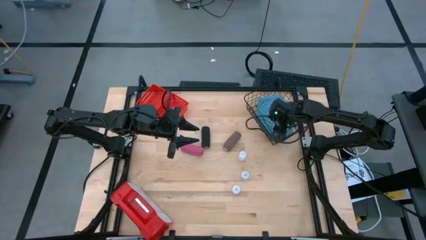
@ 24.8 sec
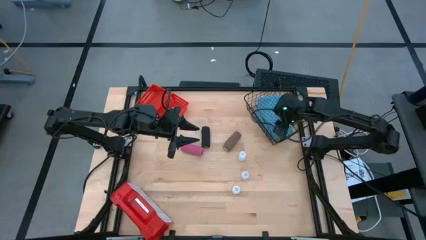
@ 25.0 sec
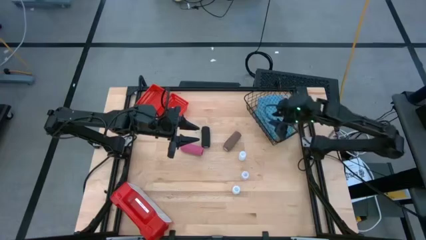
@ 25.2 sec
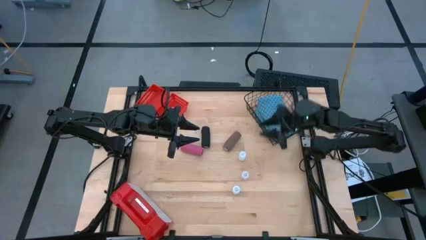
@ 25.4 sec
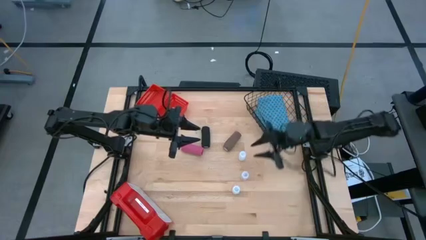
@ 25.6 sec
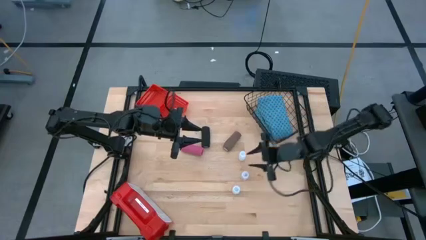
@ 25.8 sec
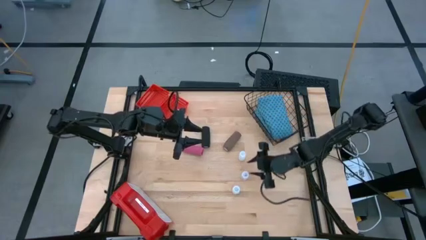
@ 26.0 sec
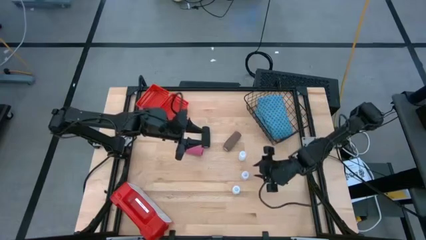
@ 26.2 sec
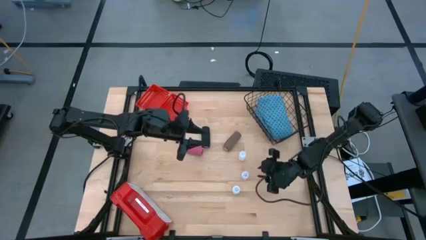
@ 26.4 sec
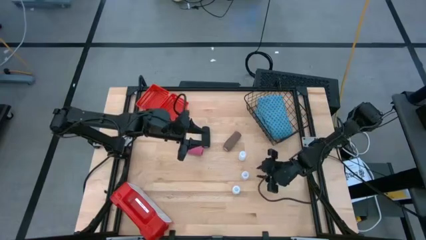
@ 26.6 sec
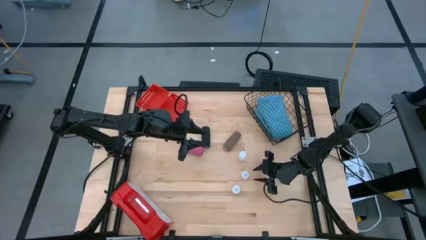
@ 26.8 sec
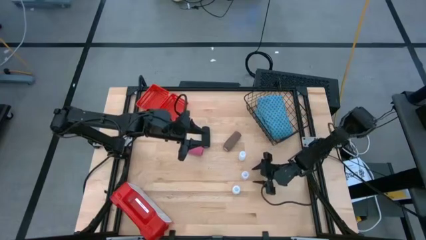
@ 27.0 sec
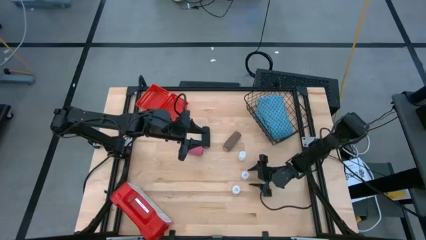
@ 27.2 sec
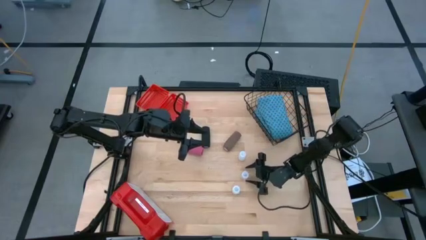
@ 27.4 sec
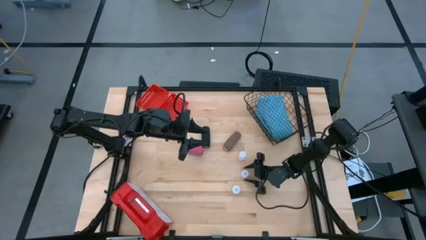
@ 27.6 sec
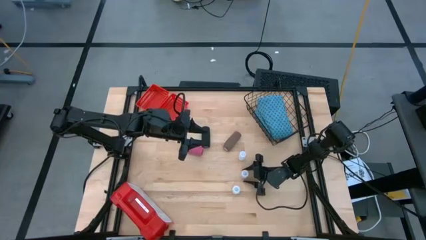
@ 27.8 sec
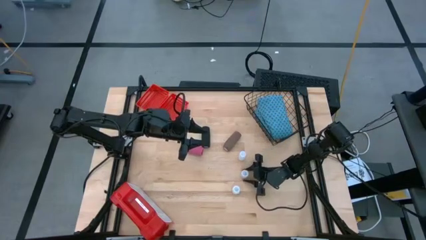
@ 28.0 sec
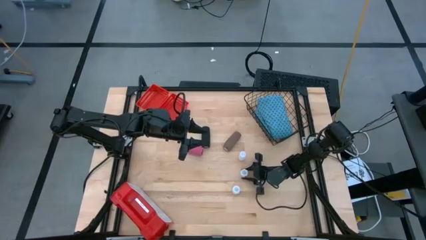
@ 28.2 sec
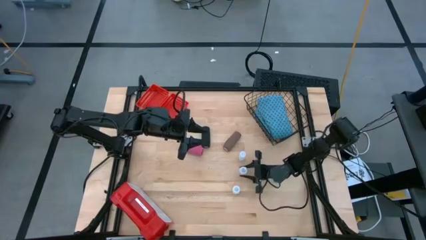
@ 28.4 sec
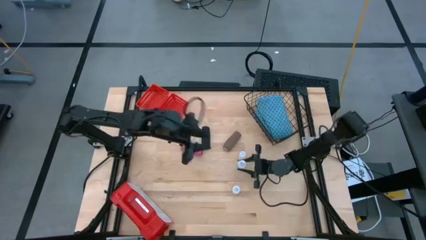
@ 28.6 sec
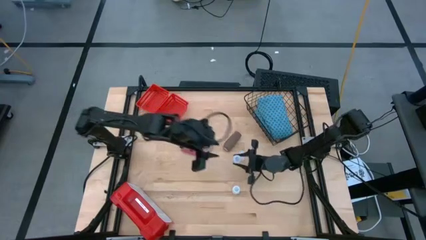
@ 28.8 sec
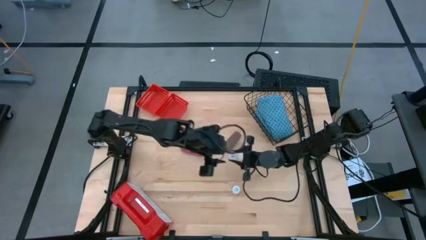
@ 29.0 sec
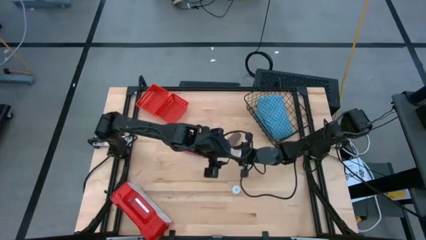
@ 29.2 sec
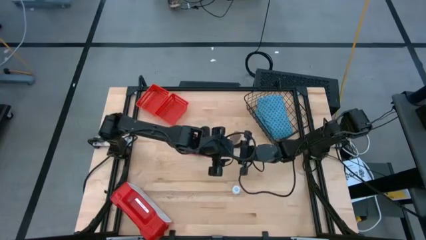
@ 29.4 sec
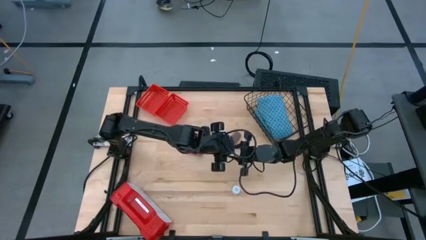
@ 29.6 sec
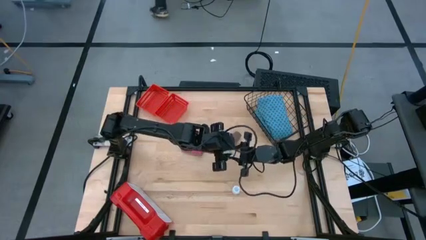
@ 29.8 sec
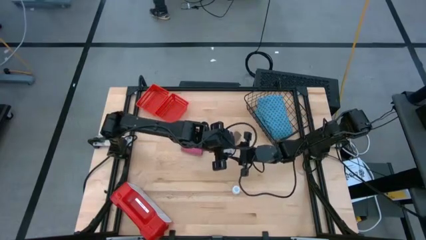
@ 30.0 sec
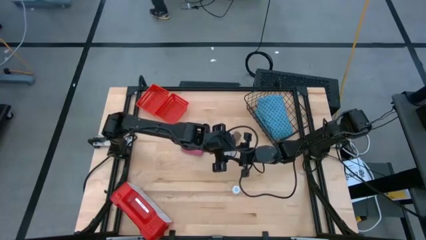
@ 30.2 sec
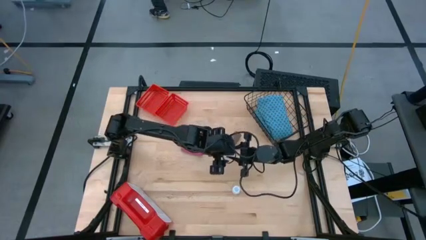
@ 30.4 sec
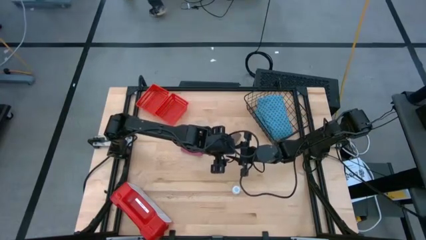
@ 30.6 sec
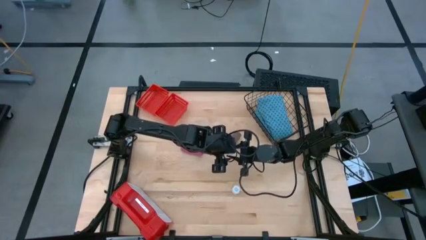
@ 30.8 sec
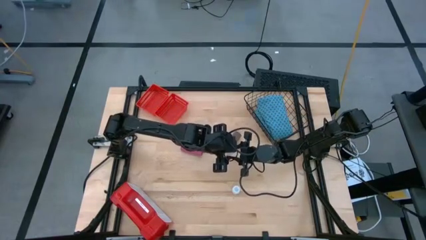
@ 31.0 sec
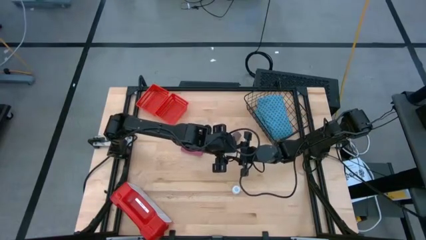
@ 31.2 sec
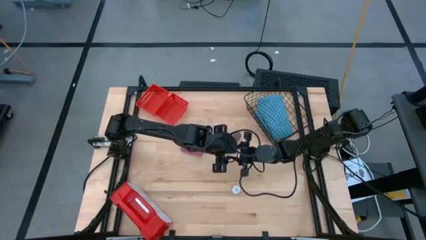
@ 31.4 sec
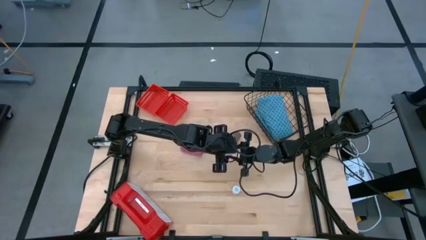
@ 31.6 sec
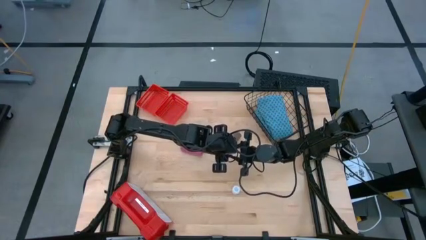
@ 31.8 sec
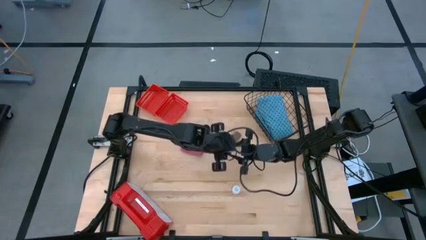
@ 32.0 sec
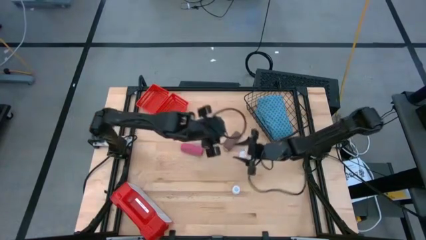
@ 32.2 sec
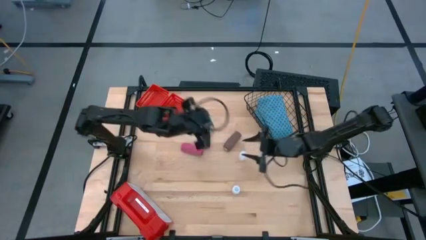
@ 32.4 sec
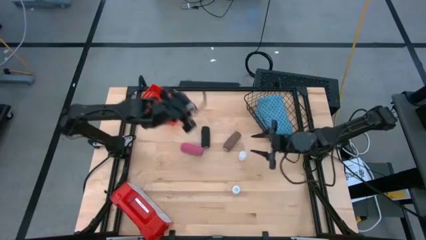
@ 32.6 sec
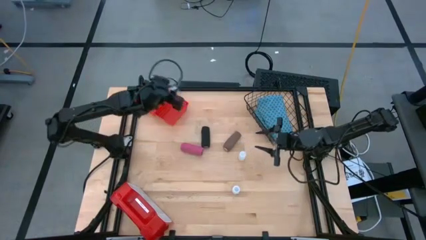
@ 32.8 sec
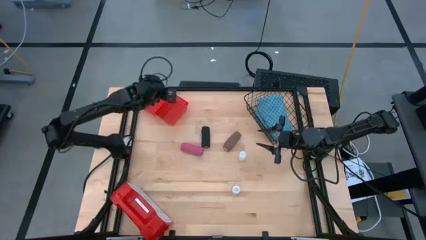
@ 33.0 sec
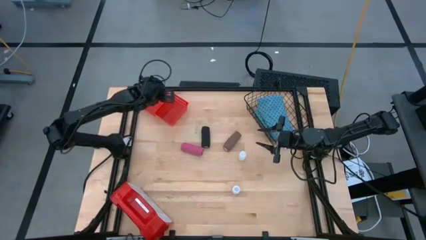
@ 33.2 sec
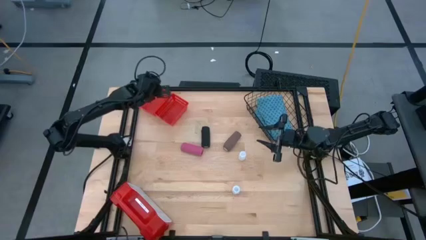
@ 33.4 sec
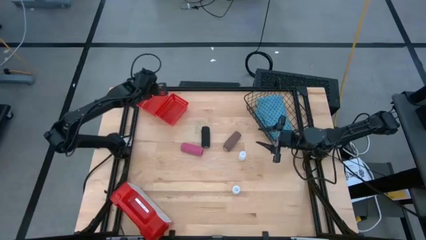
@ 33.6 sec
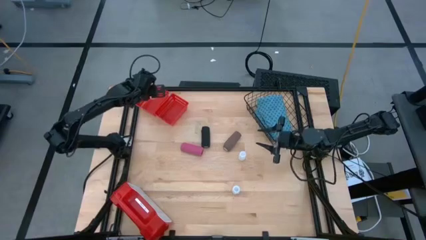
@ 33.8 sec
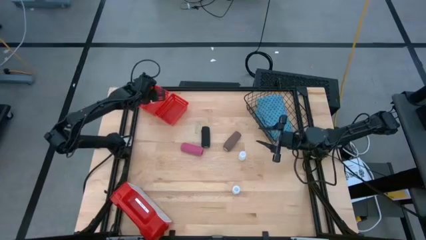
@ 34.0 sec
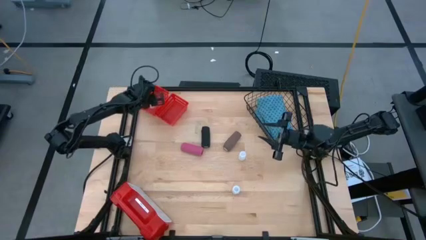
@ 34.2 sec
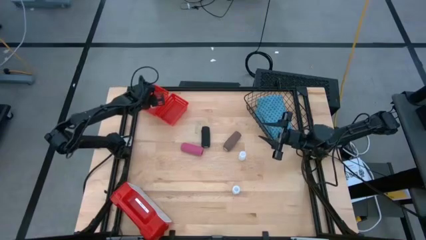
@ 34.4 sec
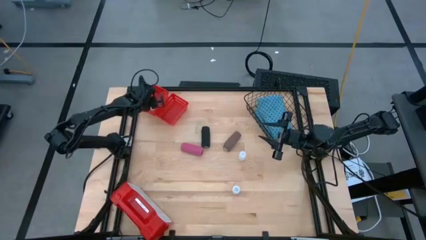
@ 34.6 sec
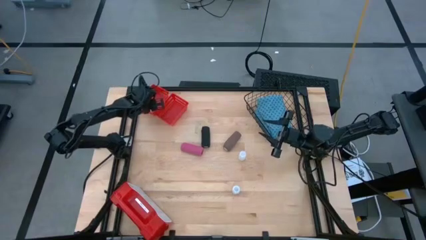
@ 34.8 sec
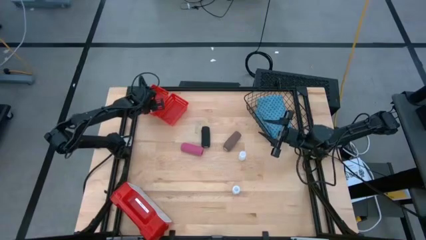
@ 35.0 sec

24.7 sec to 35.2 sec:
Task: Pick & place medical supplies in basket/bin
Put the middle transparent pill bottle into the left red bin
